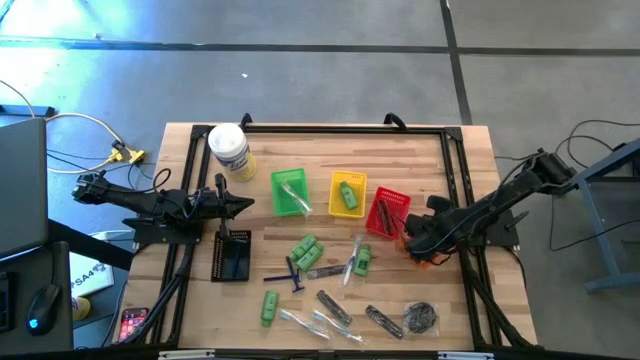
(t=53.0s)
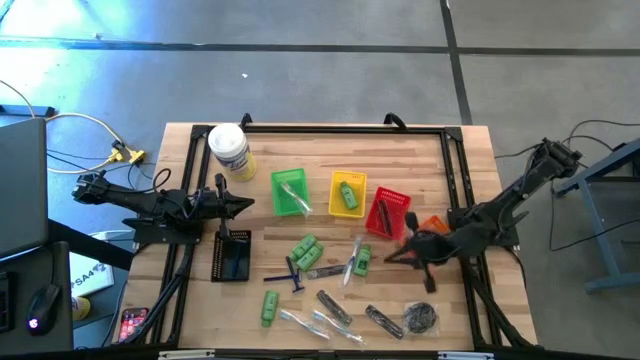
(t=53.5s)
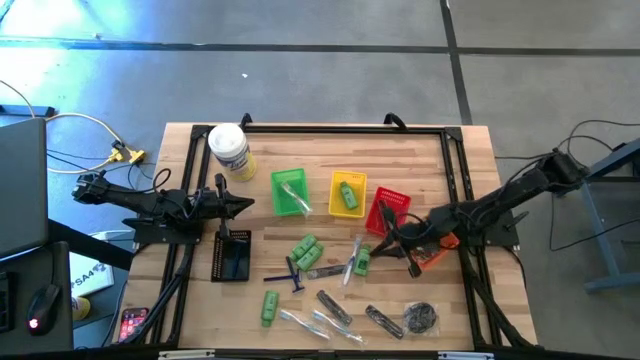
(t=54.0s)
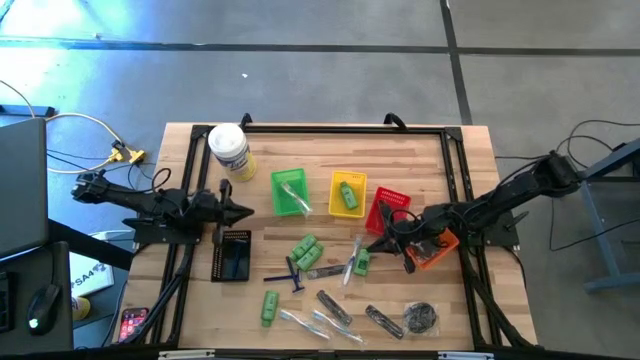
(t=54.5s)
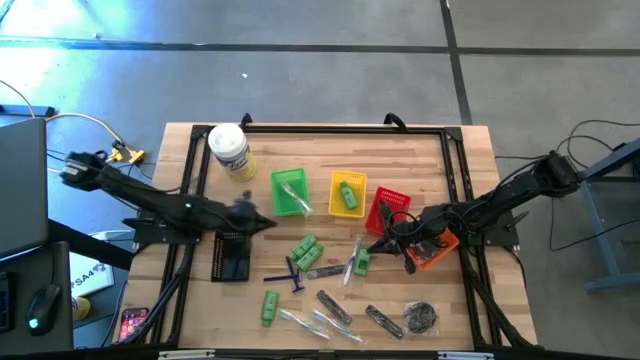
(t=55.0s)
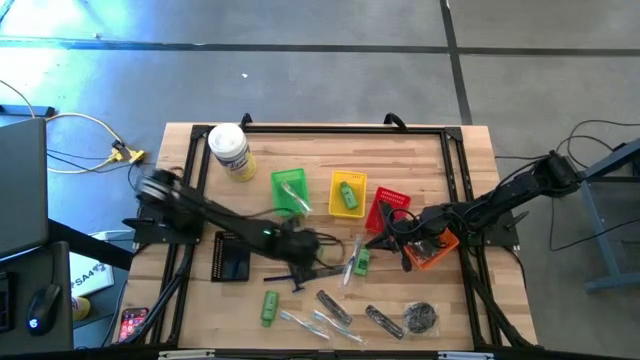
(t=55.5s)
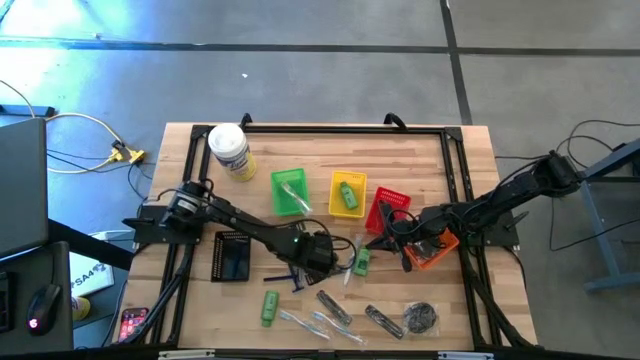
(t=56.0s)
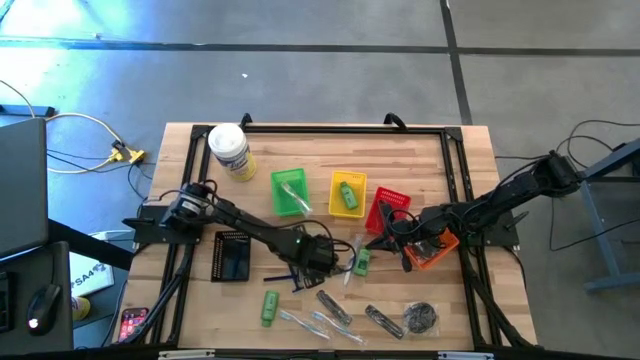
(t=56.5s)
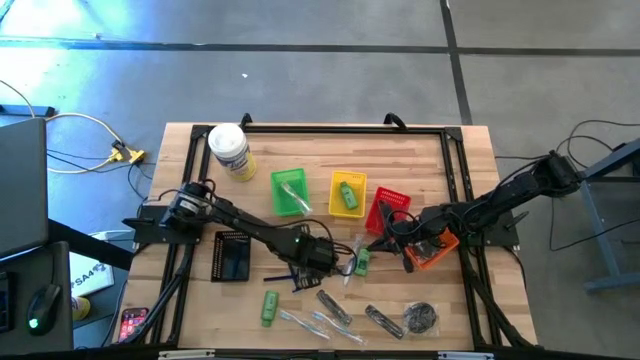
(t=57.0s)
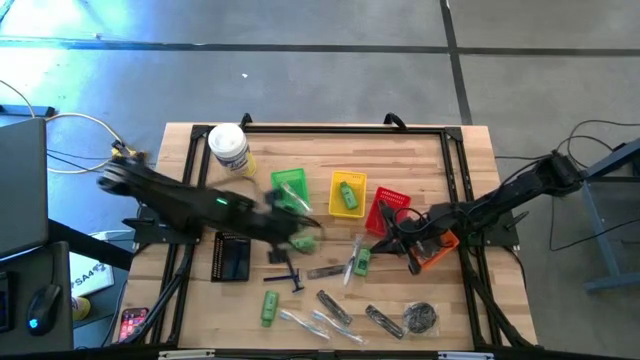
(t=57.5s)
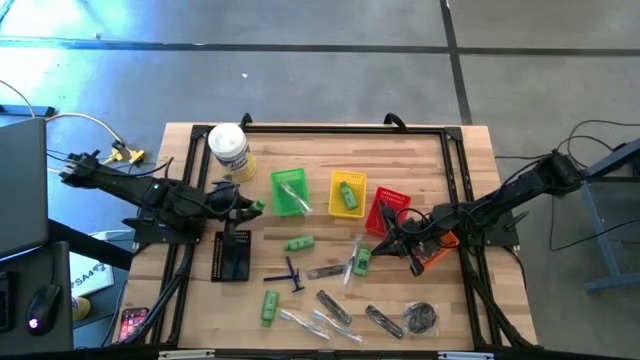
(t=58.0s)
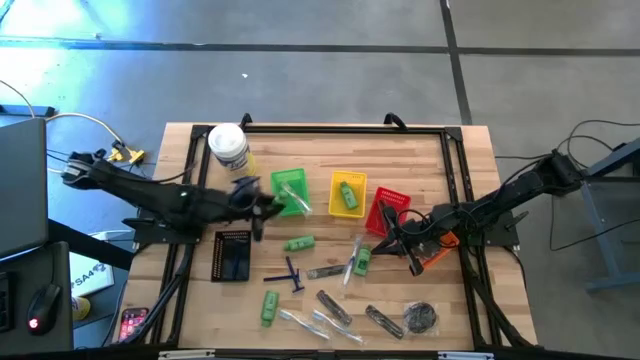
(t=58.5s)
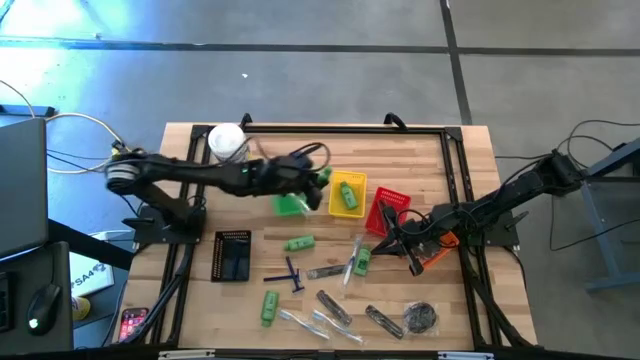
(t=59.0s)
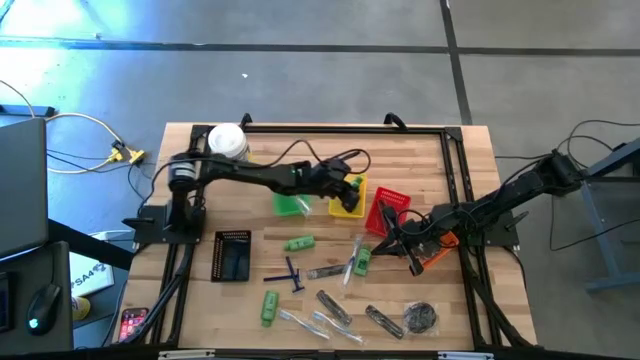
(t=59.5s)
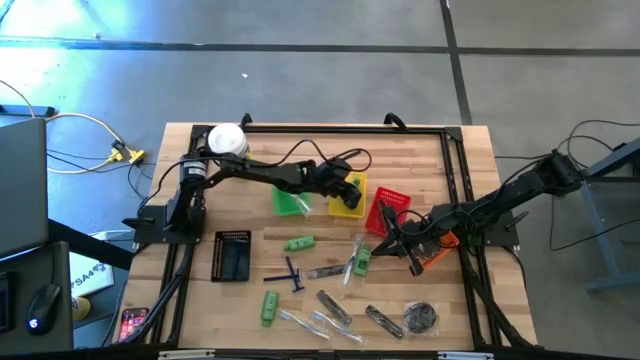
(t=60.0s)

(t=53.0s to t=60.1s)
Task: Pick & Place Travel size toiletries
Put the green shampoo into the yellow bin

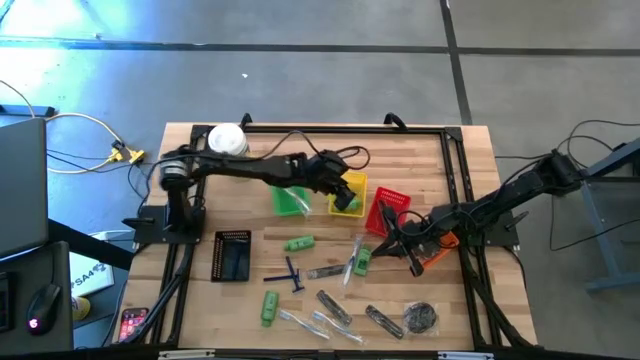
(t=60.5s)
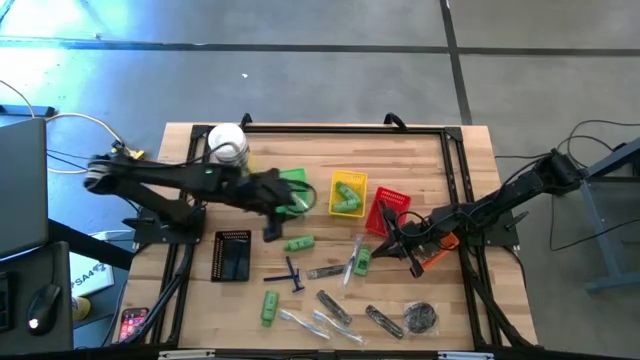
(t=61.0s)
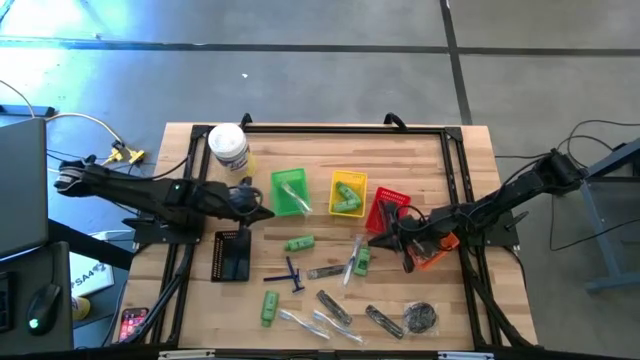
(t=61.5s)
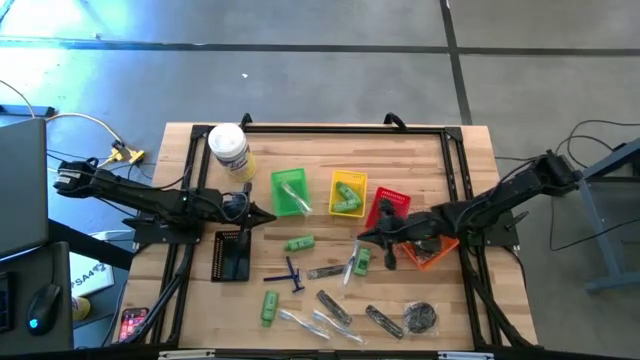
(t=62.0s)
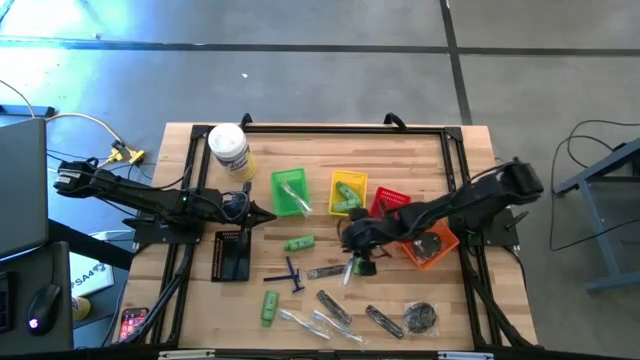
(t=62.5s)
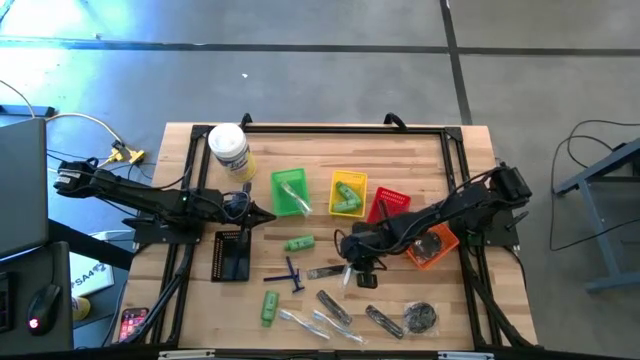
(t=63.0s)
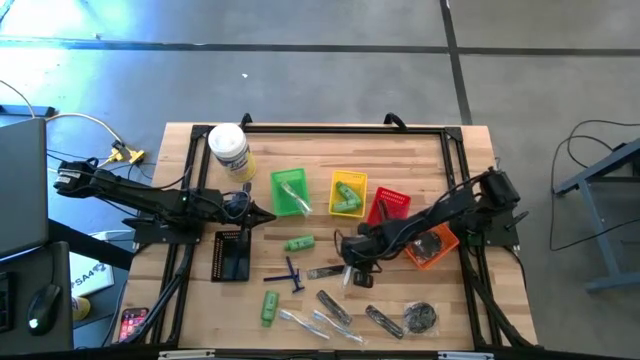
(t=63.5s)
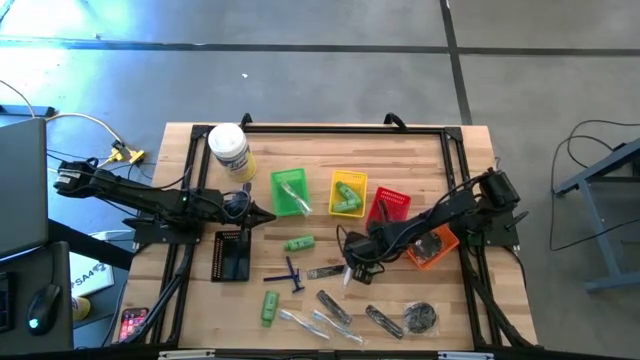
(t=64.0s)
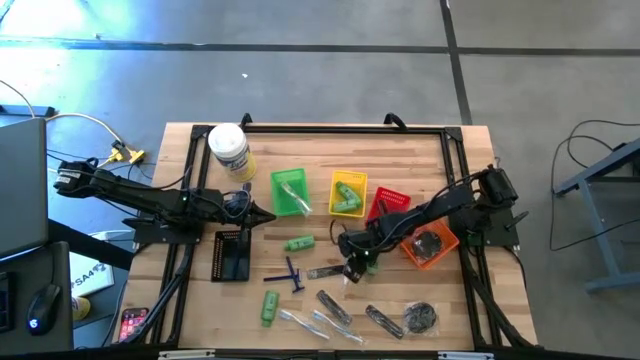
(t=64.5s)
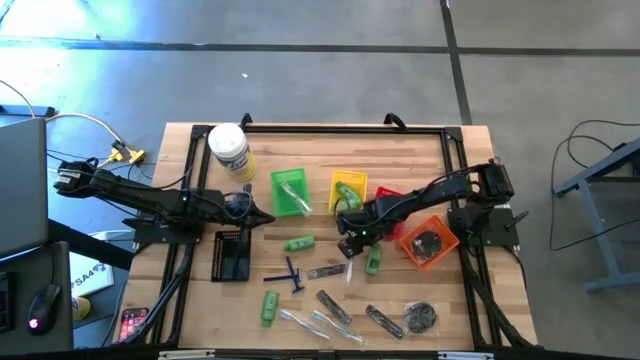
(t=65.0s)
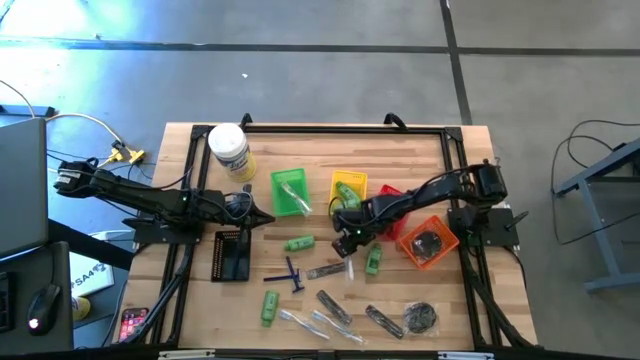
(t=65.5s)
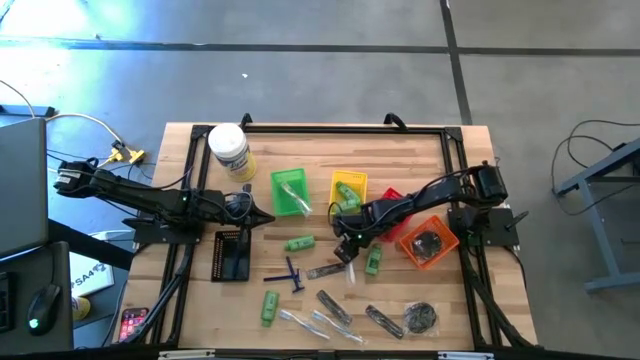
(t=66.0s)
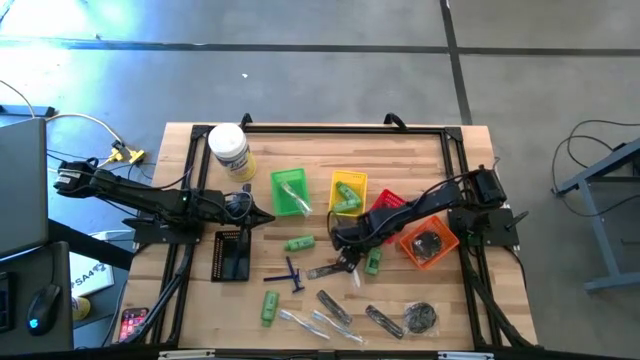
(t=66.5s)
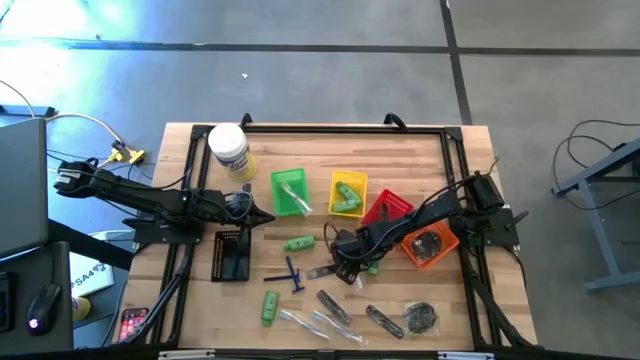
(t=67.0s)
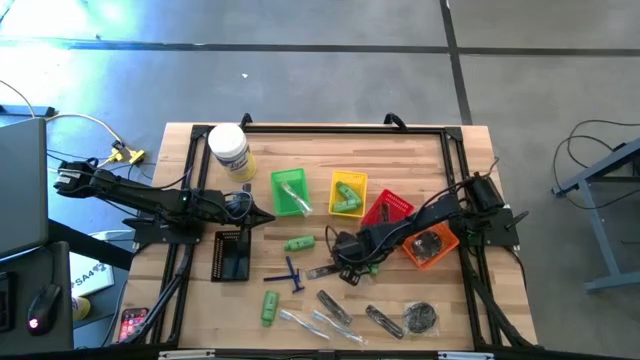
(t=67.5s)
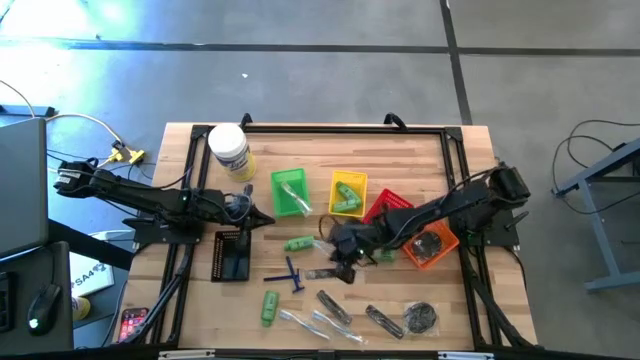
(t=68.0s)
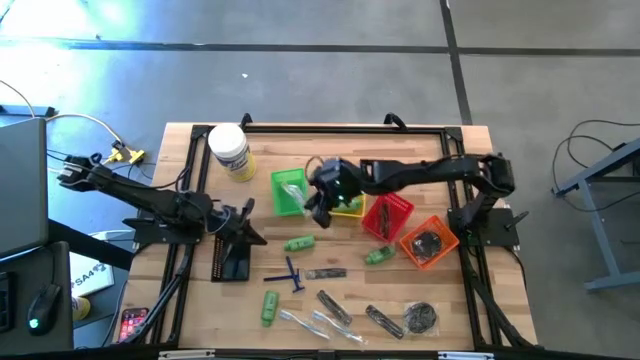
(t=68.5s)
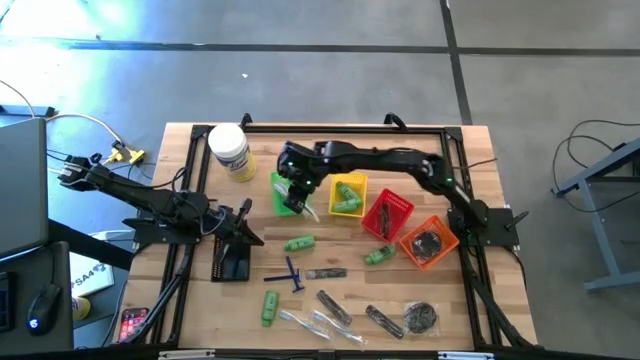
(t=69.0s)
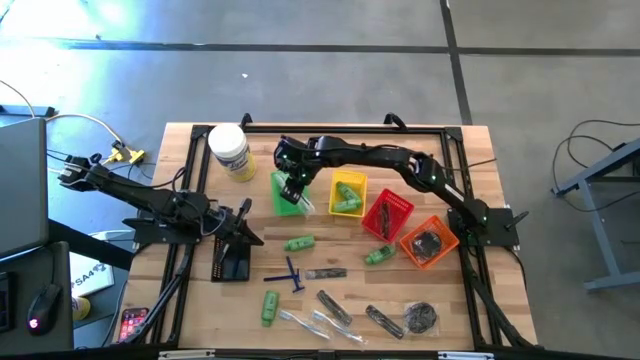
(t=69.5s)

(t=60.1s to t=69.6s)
Put the blue toothbrush into the green bin
